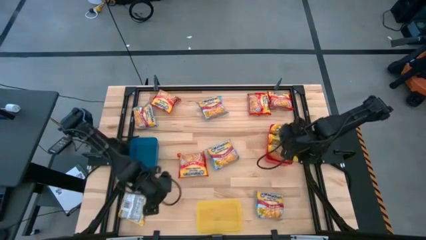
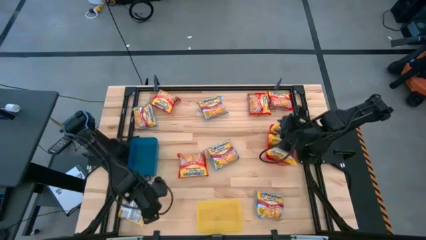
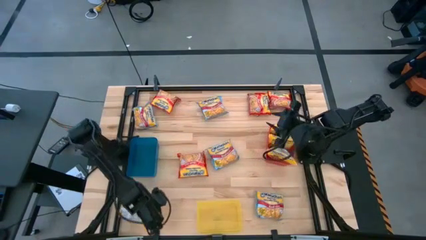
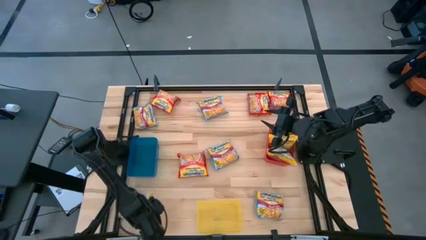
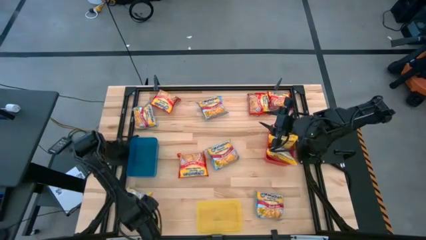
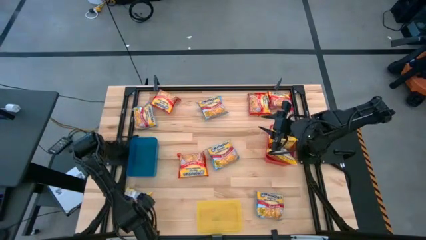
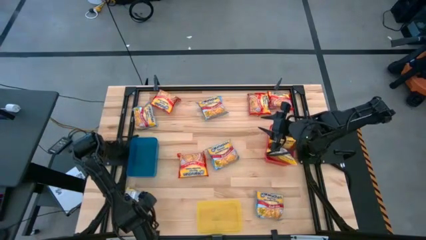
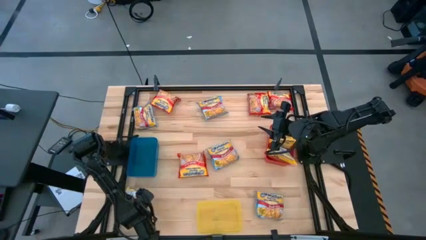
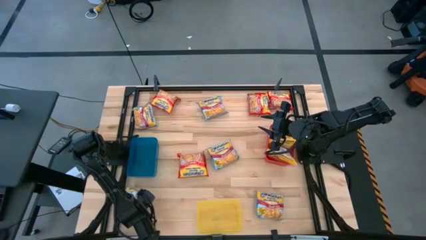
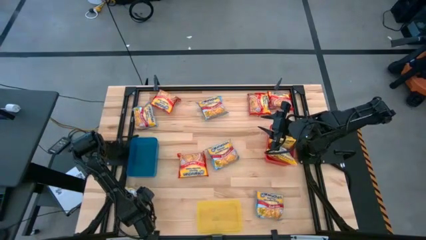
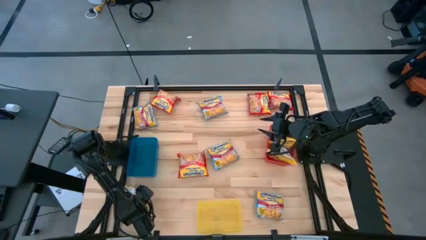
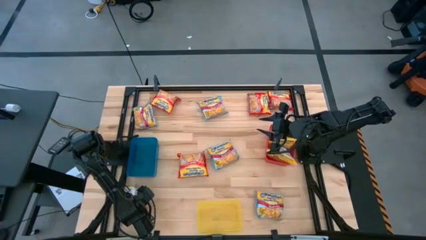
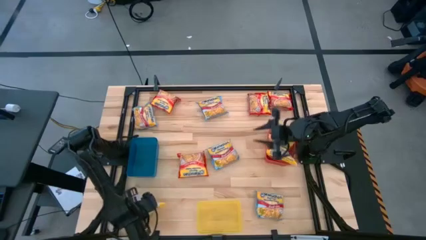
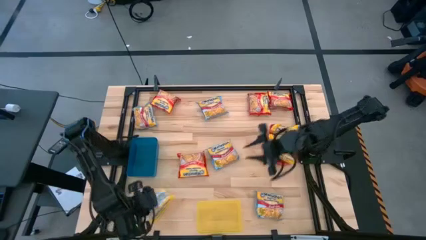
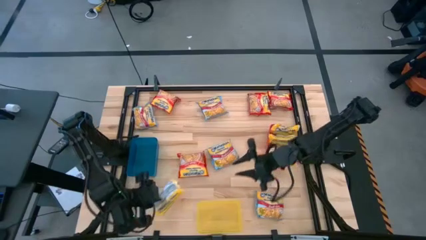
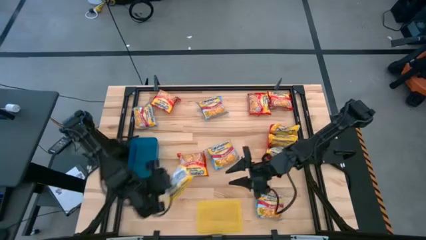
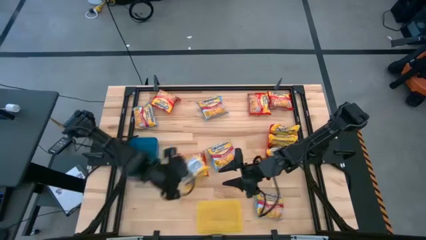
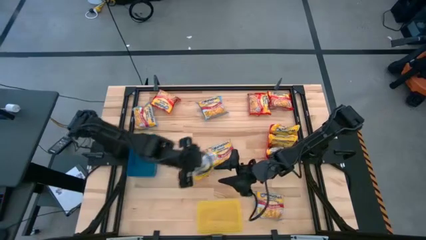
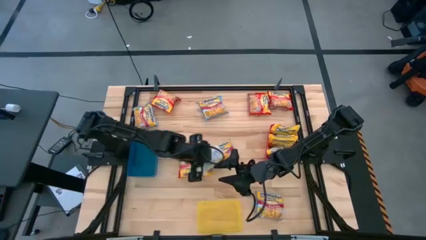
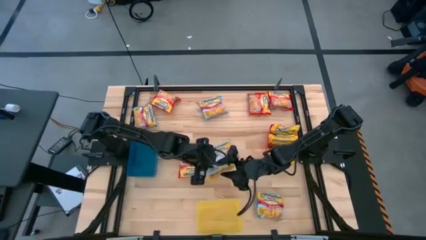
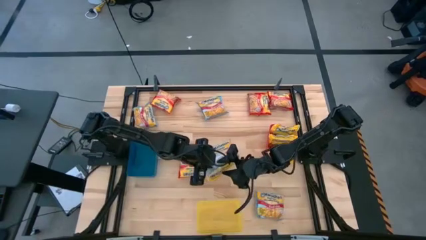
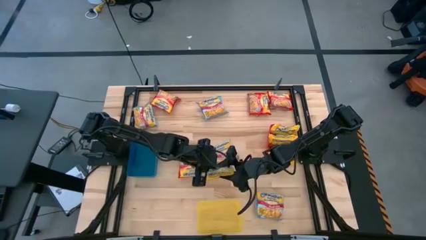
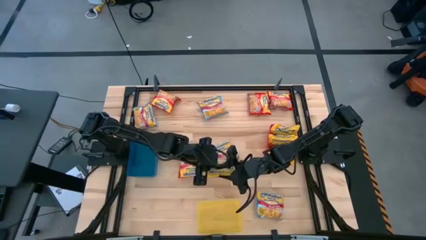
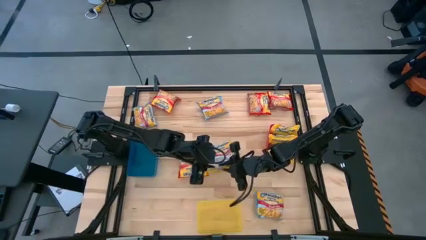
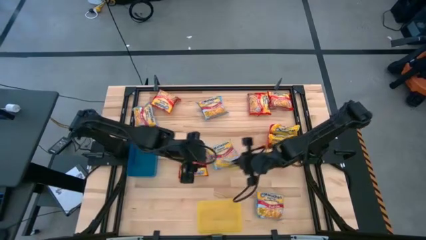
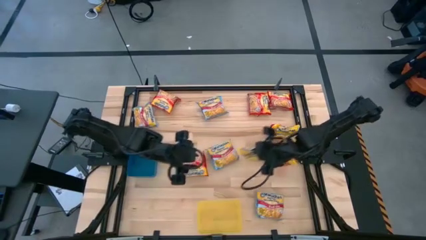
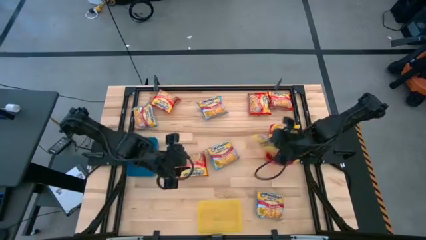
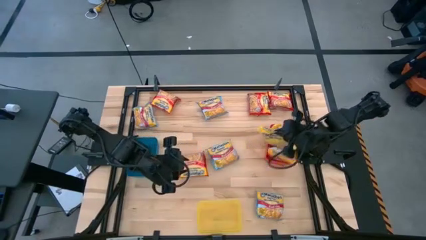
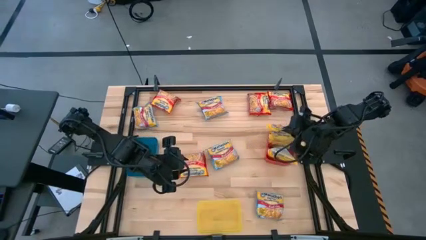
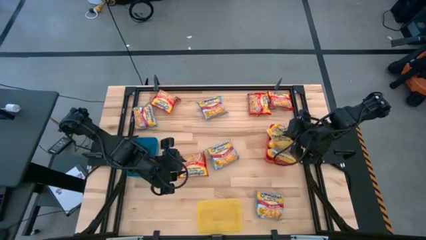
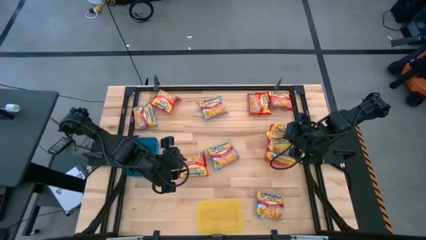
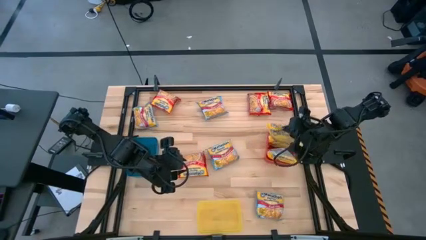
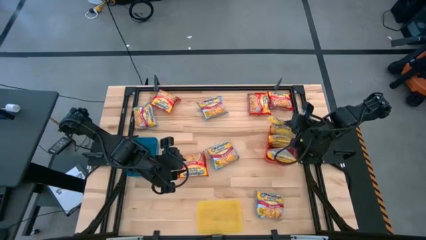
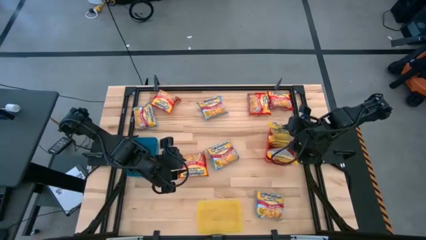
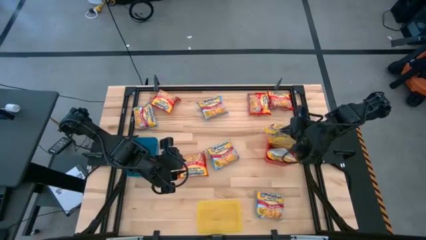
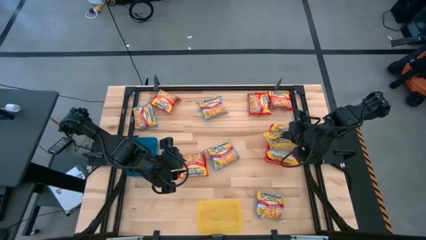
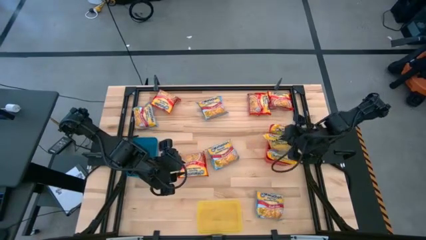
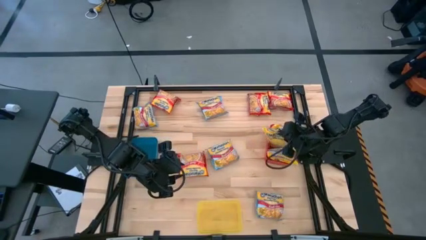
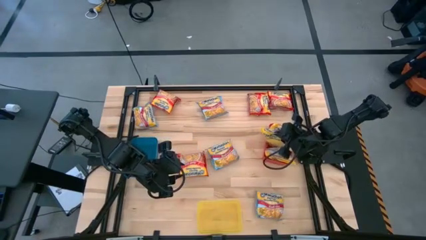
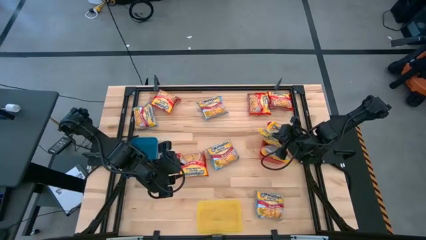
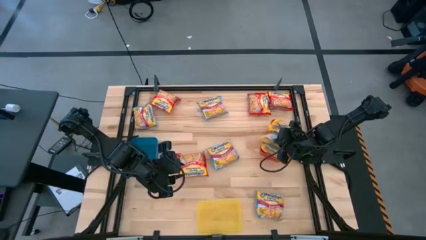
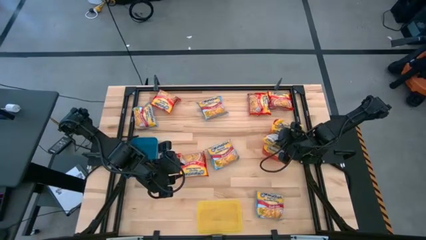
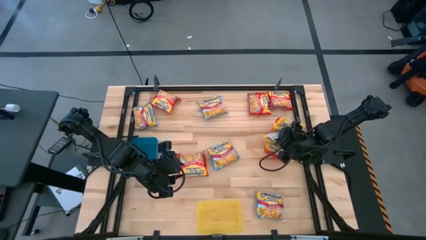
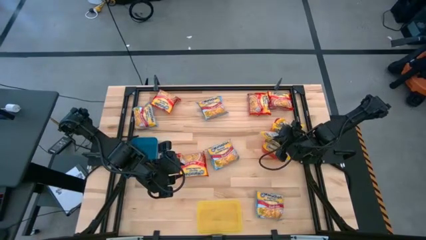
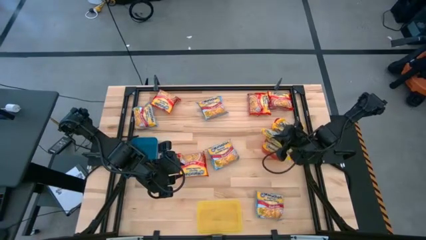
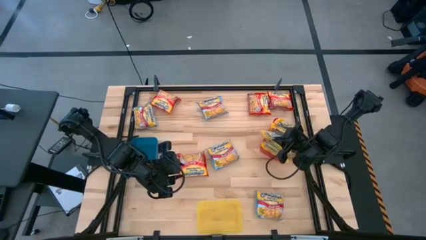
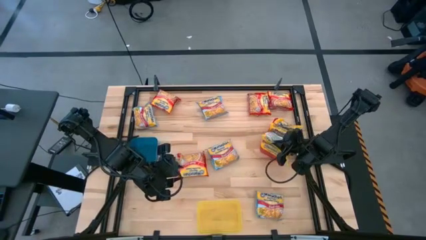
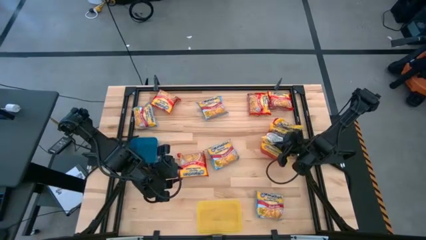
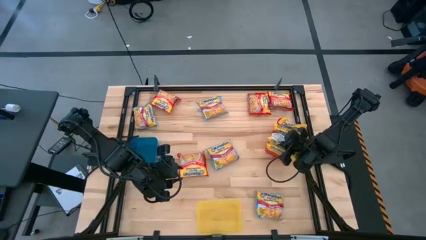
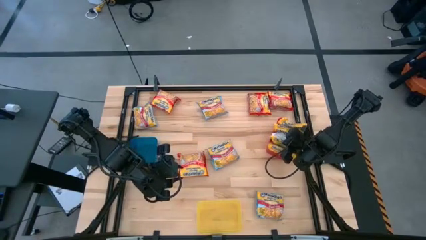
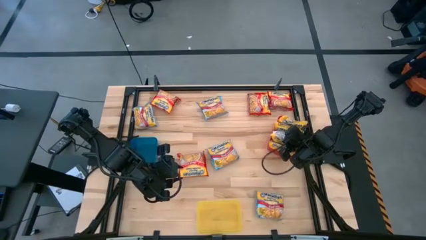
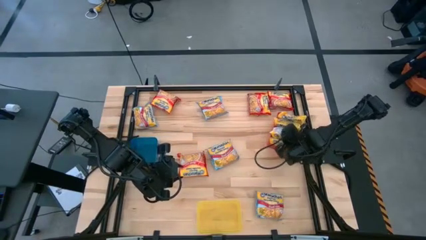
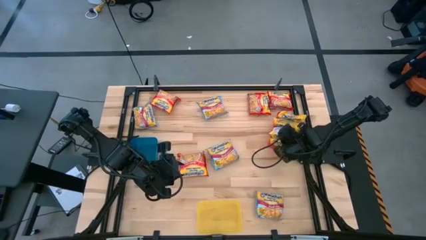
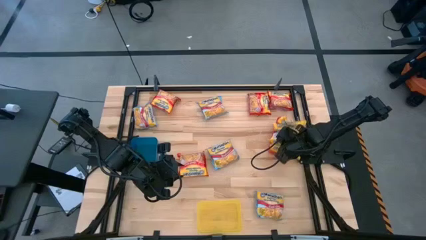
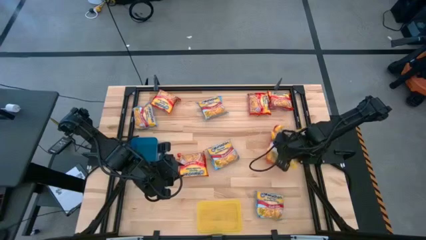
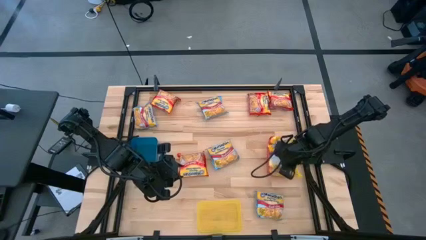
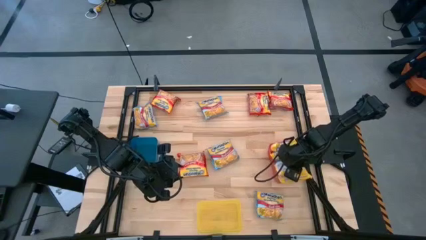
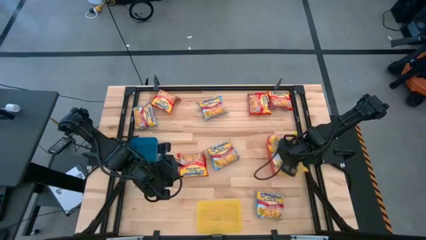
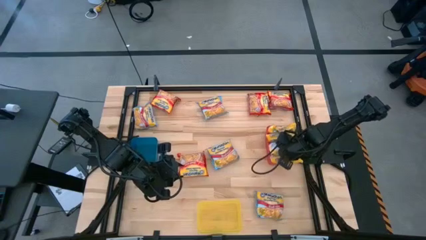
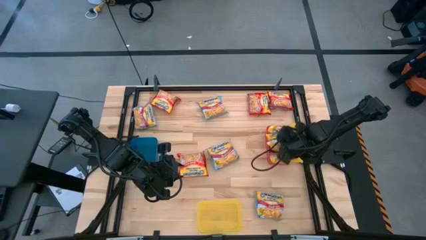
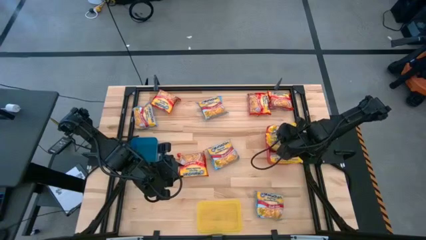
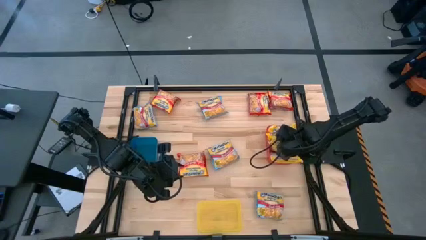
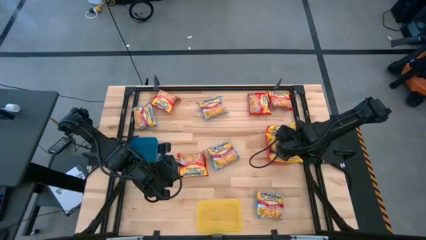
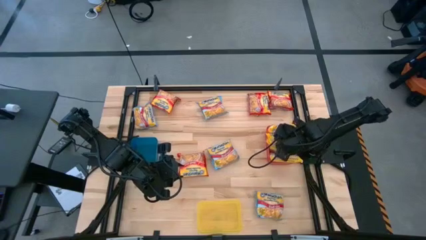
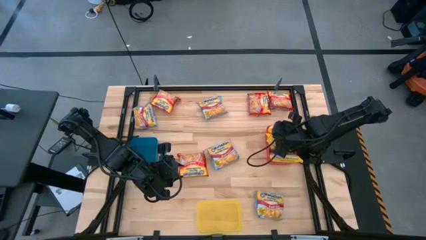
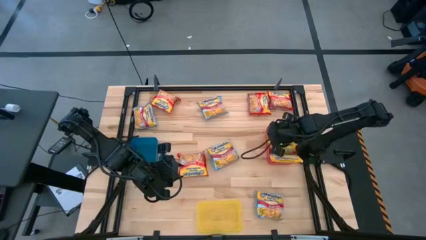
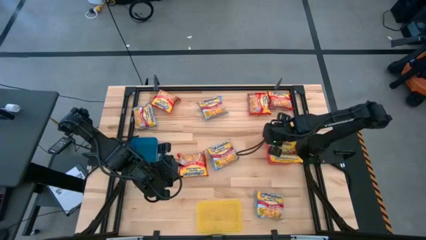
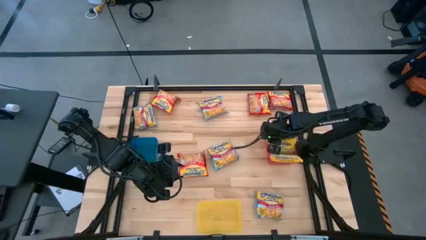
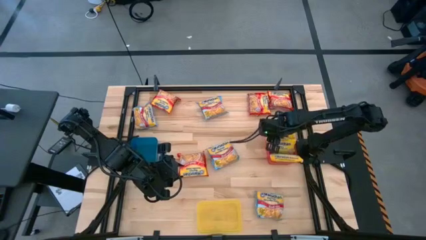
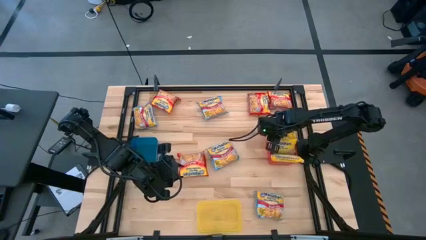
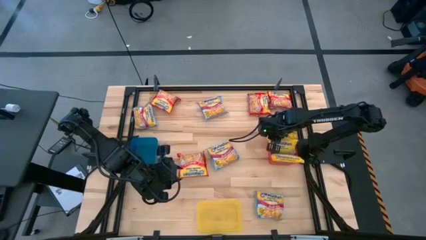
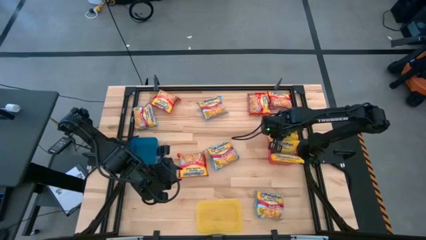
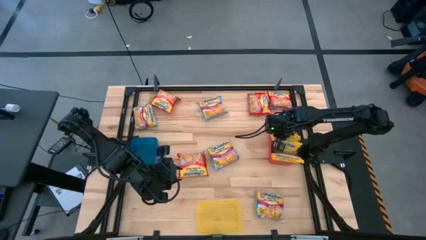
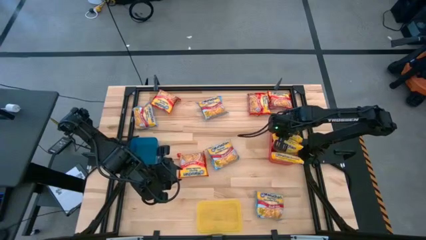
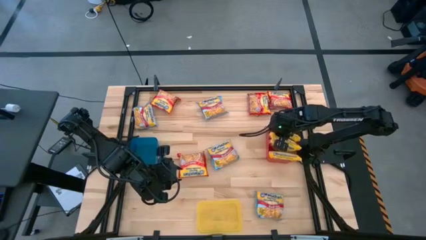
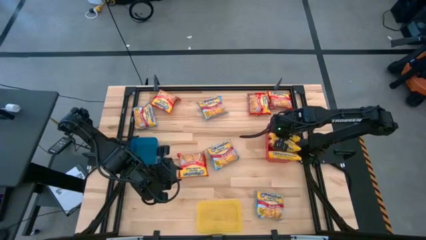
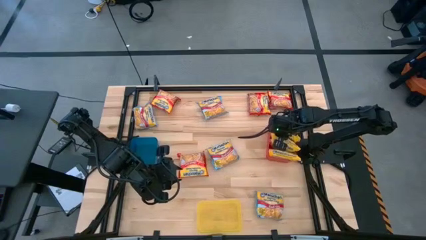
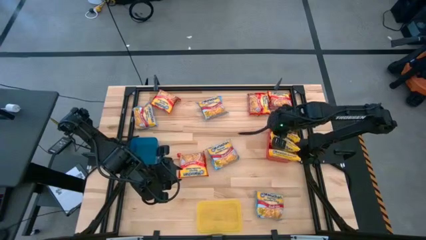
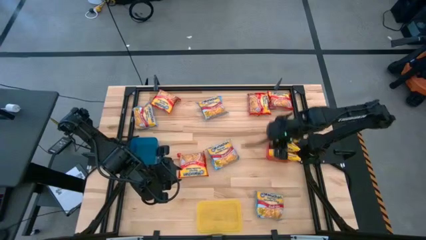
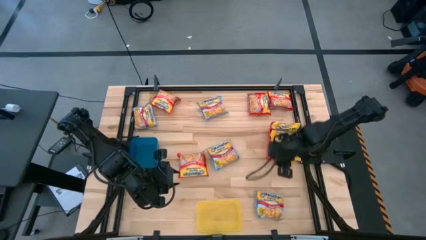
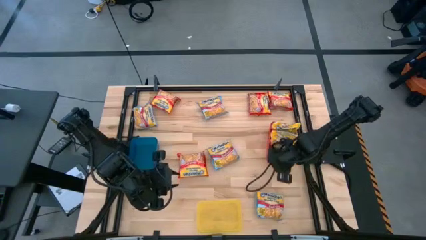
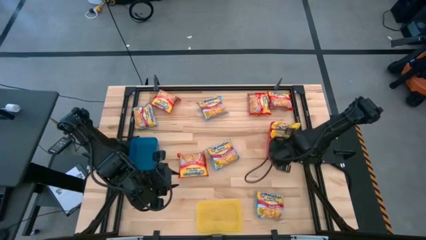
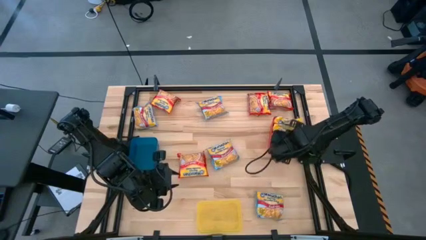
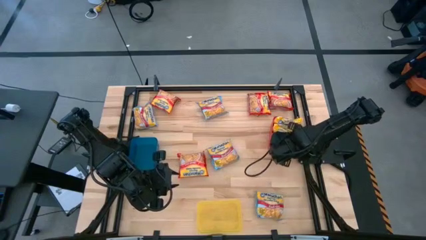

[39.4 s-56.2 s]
Task: Sort Maruchan noodles
Put the yellow noodle pack into the red bin

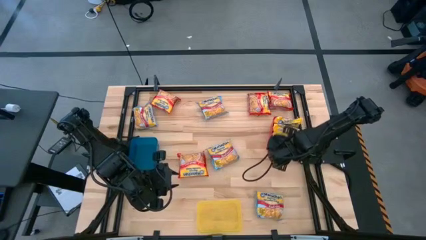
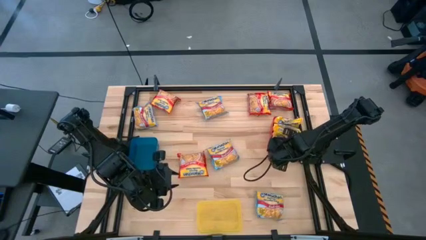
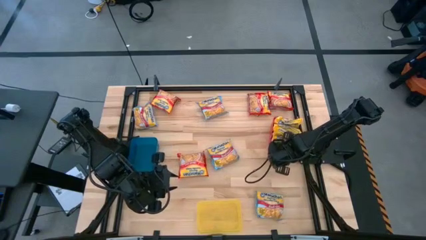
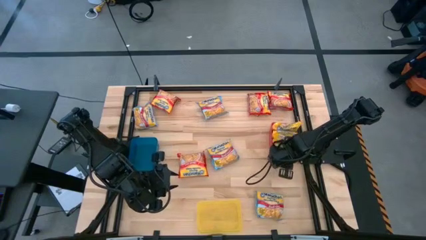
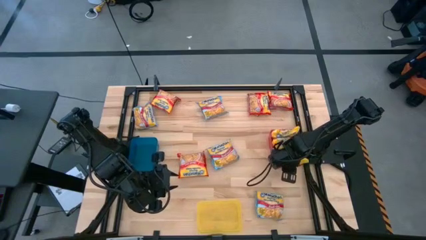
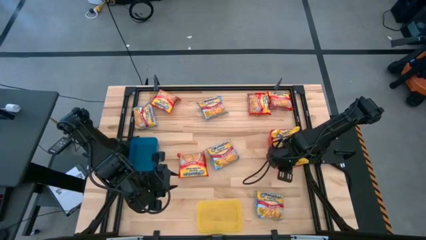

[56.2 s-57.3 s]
Adjust the the red bin
